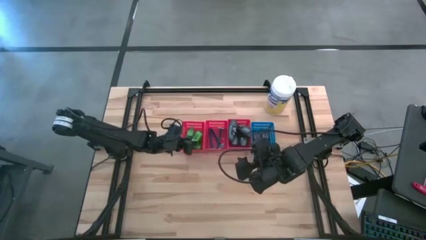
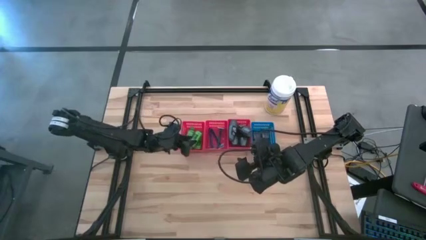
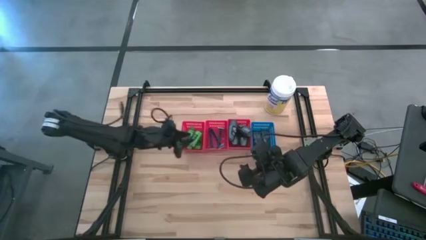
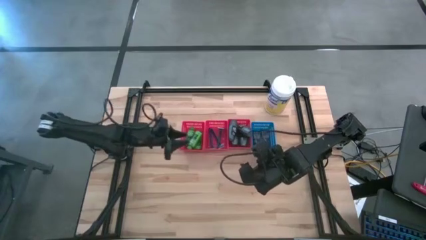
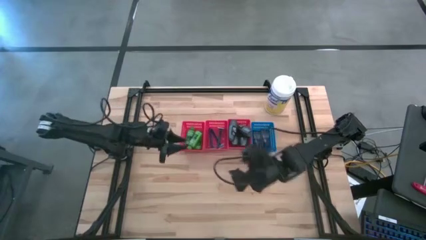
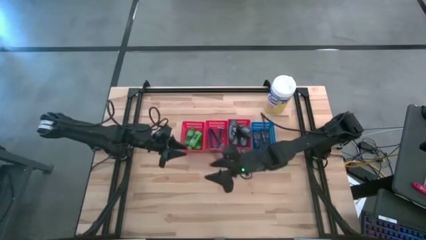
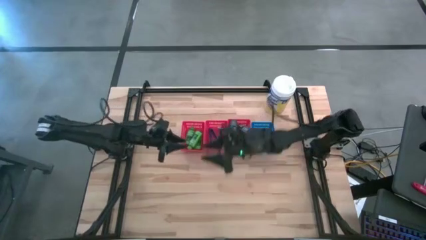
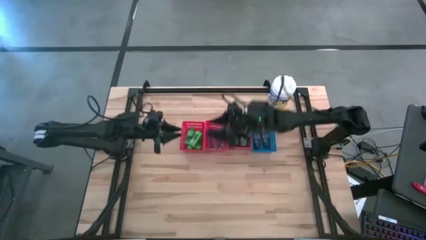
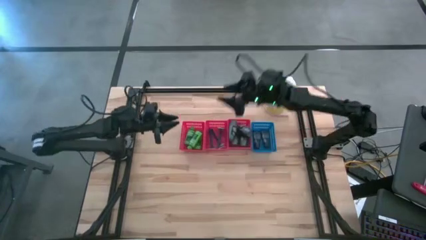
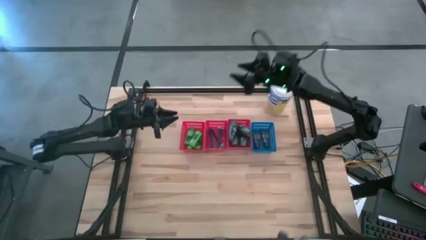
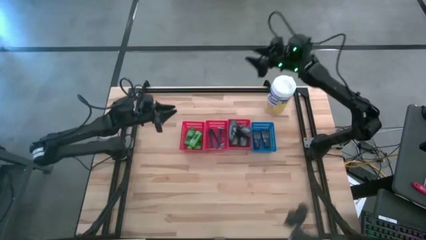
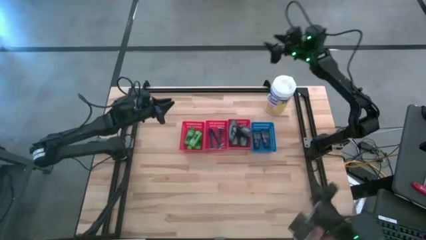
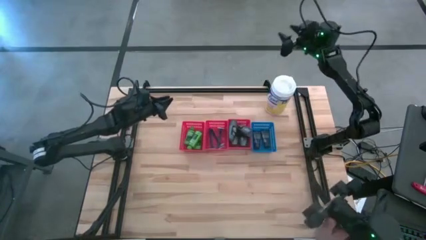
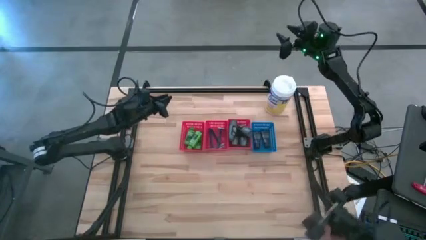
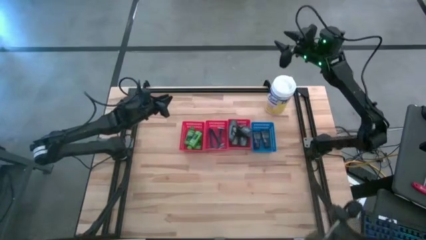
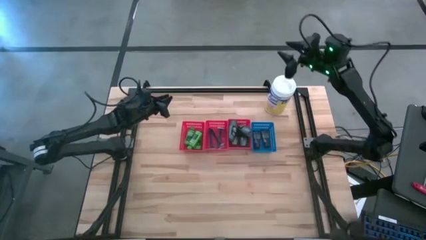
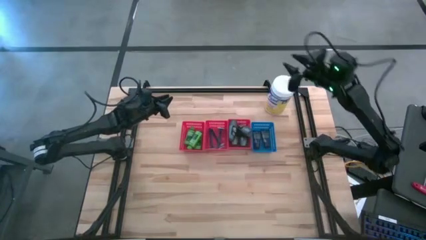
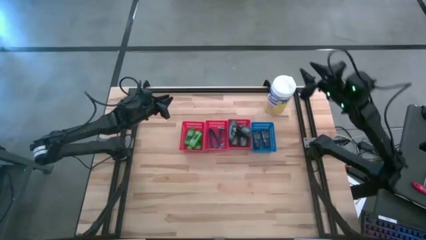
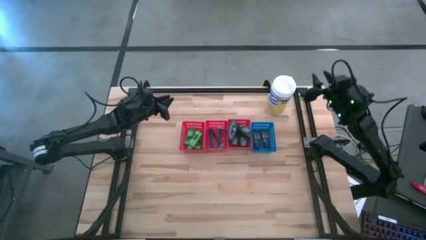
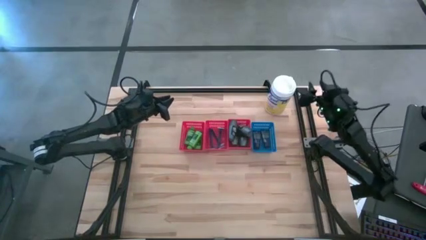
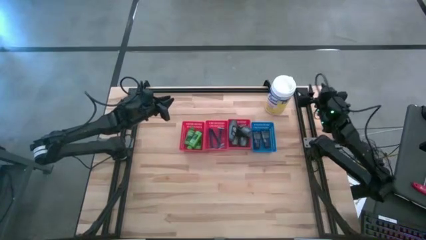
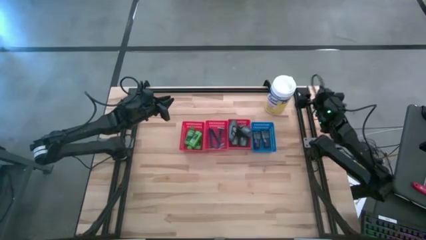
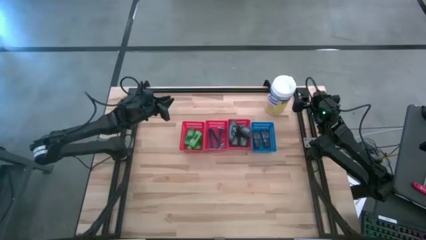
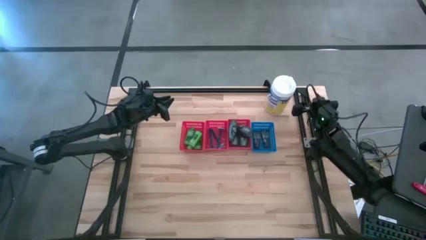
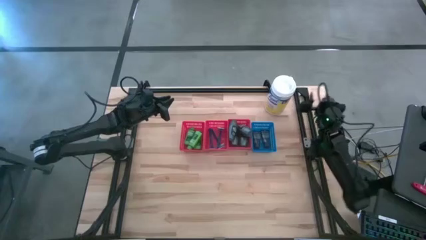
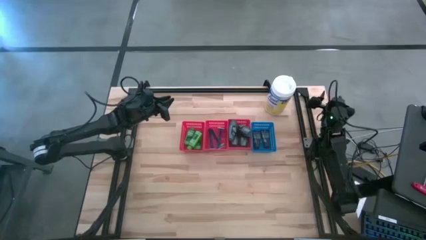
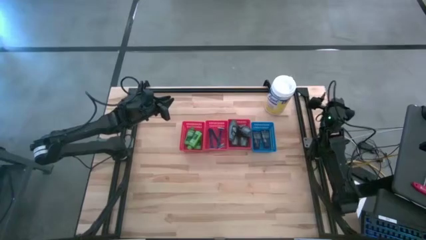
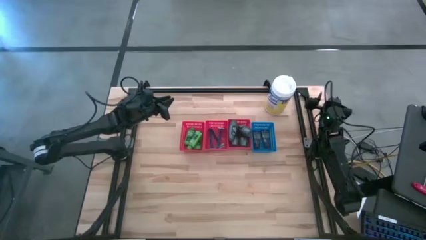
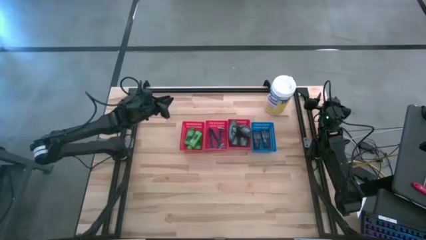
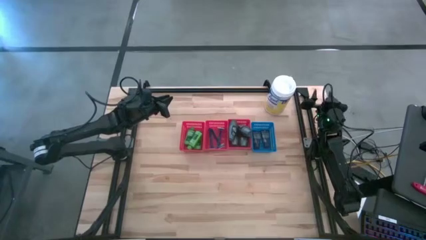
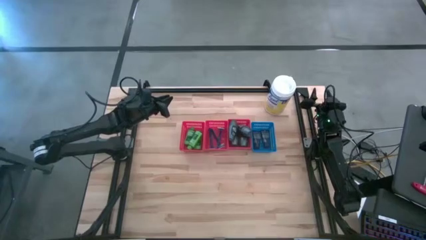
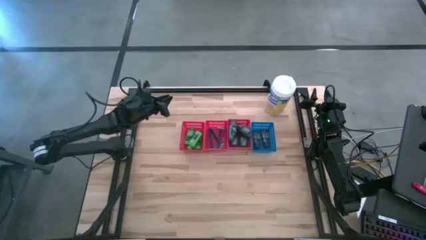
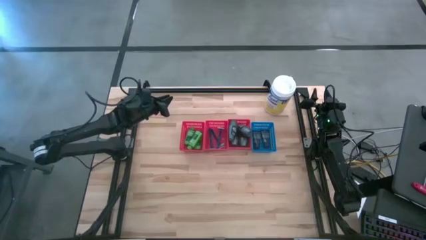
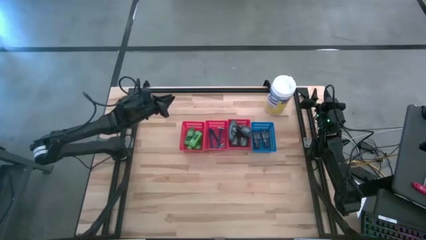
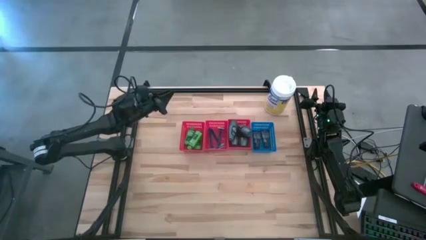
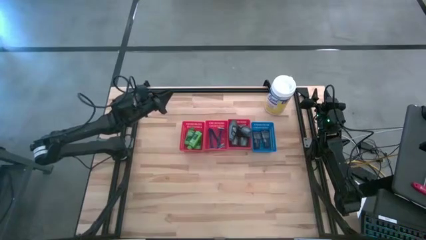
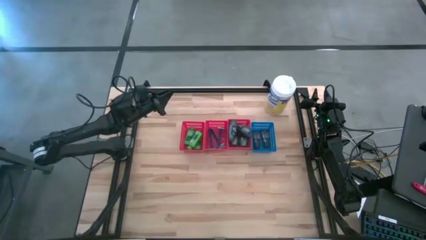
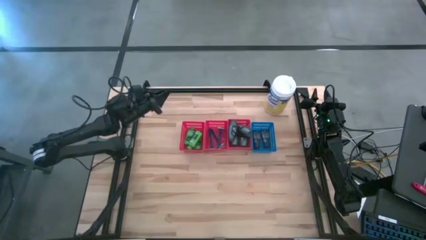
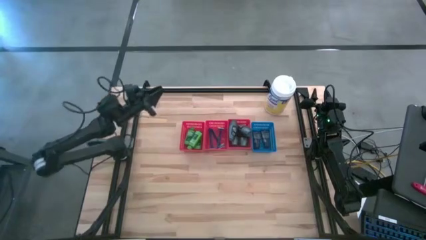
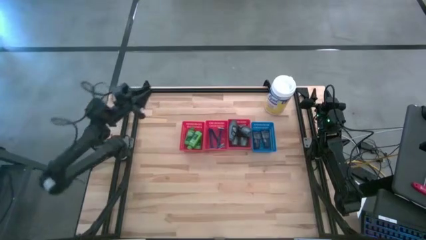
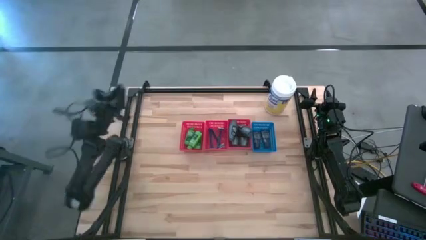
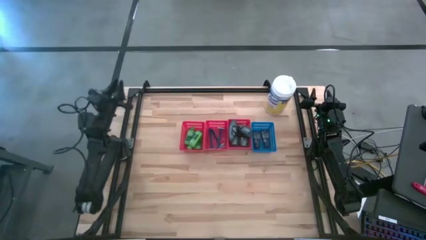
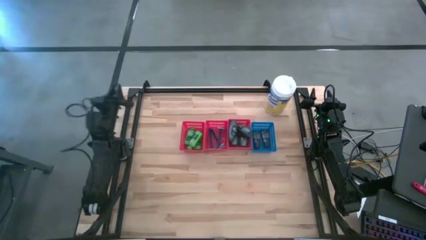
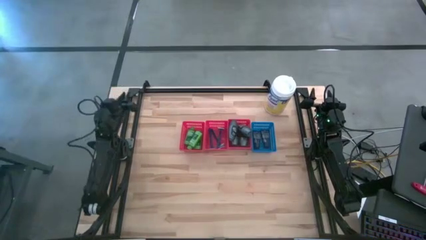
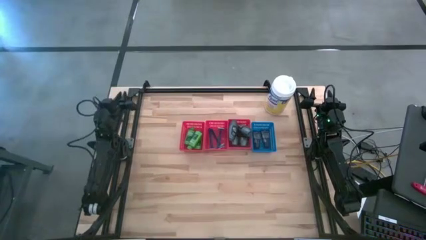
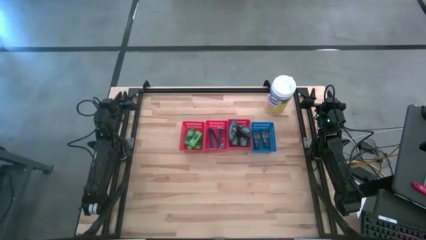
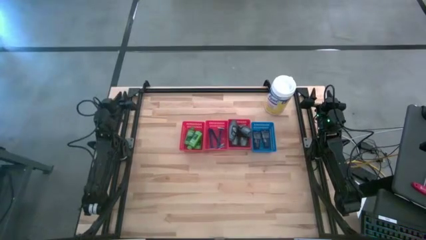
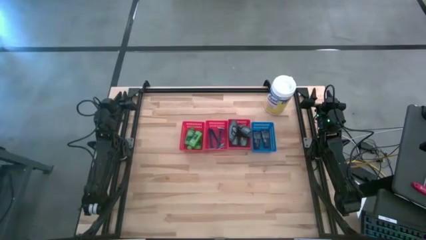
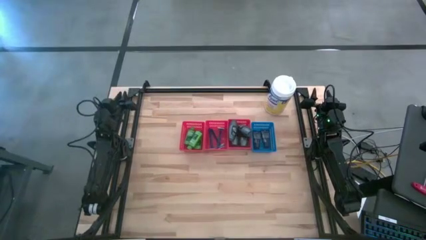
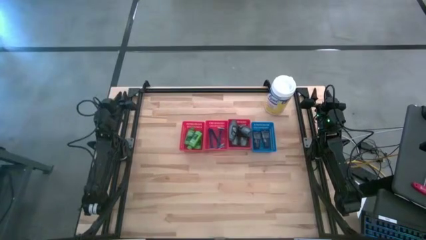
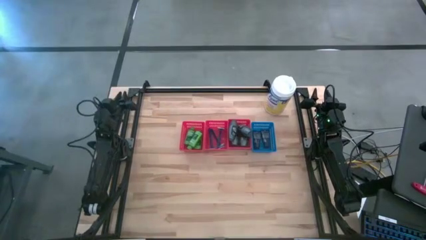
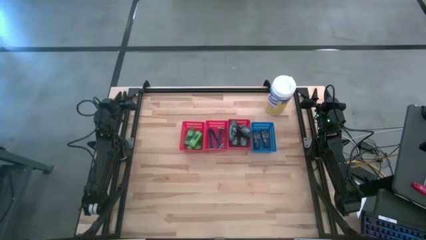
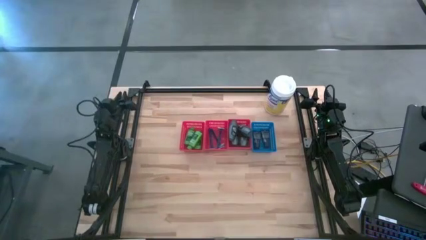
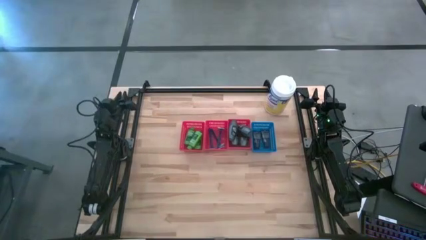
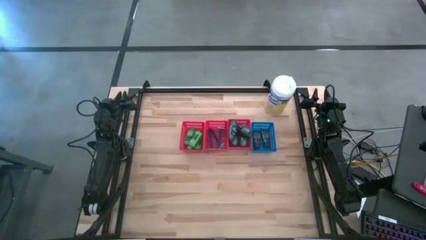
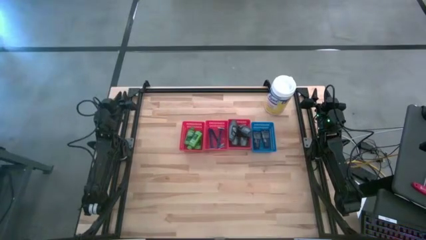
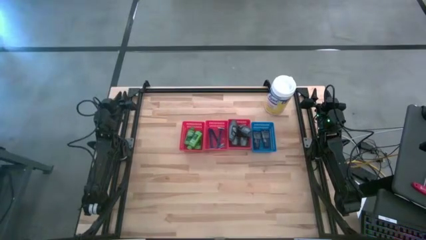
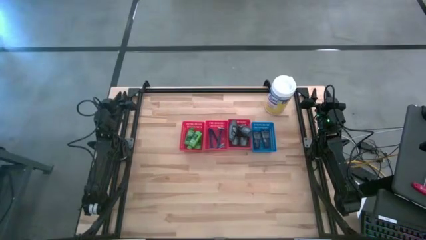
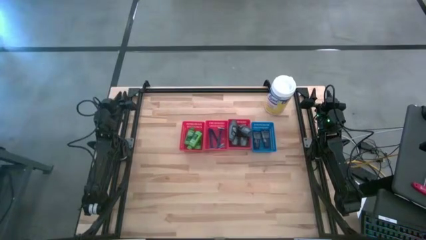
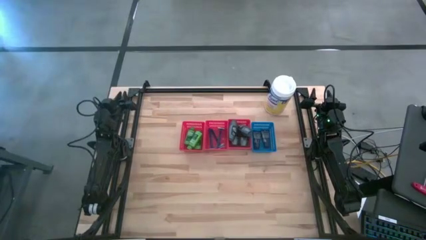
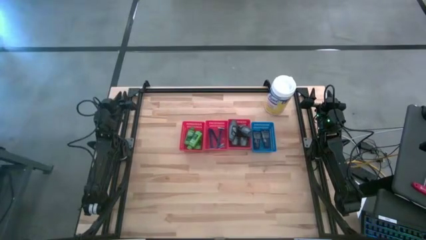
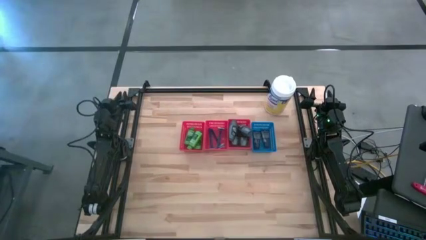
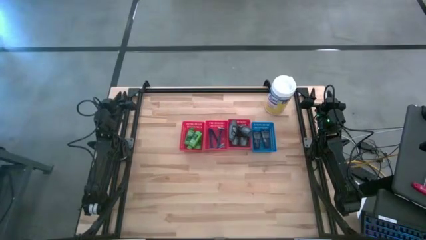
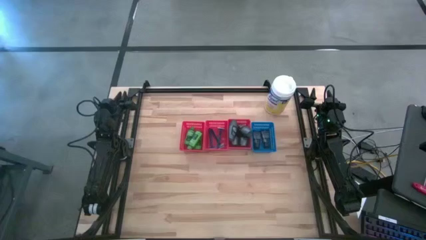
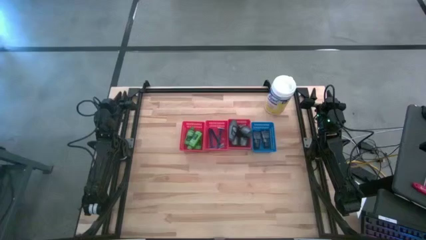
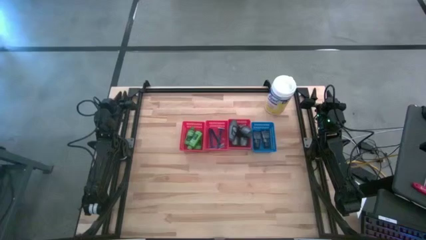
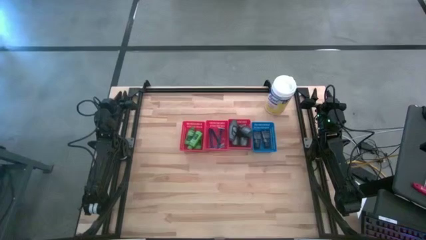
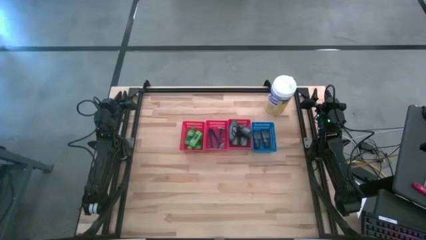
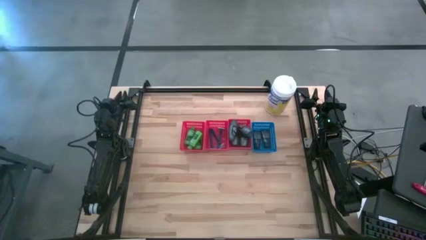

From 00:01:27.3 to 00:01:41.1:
Task: Pick & Place Travel size toiletries
Return to Home Position

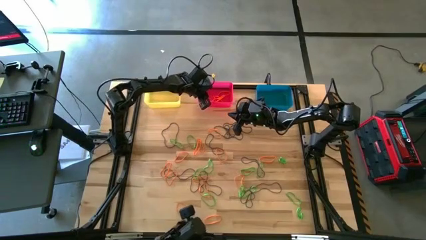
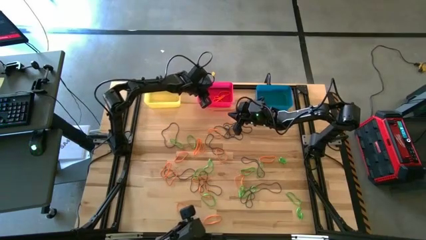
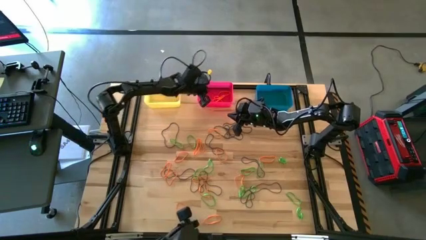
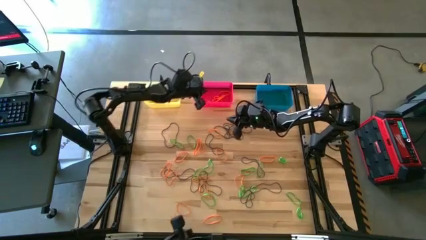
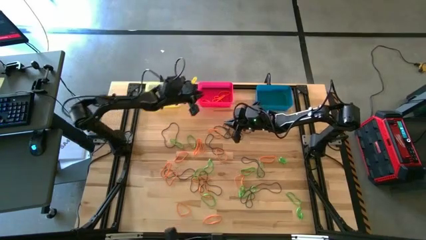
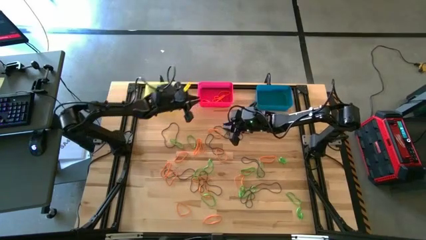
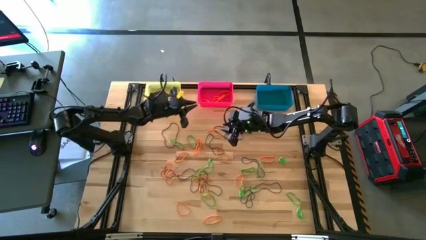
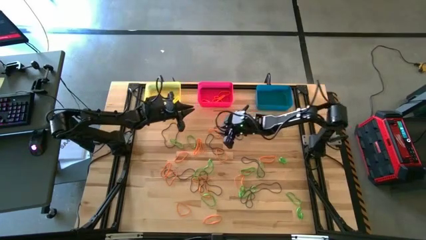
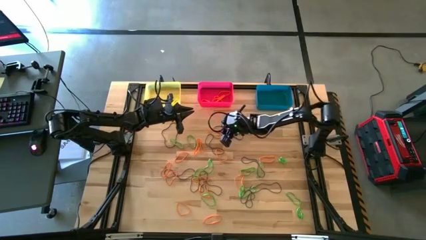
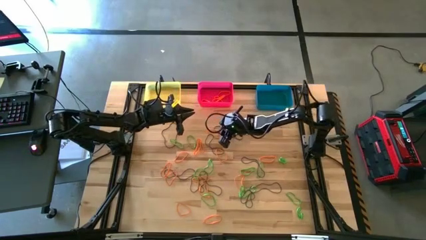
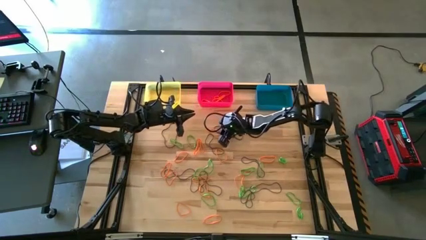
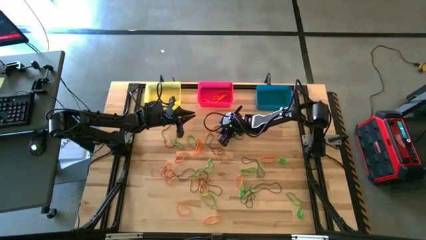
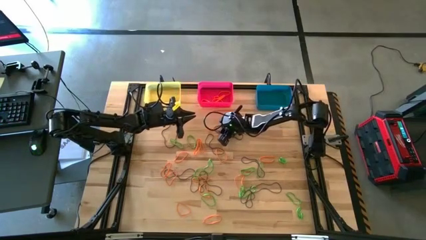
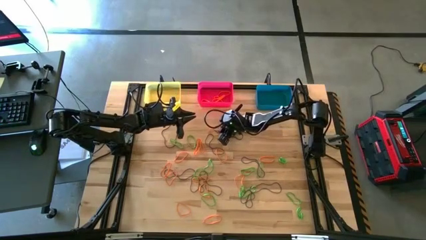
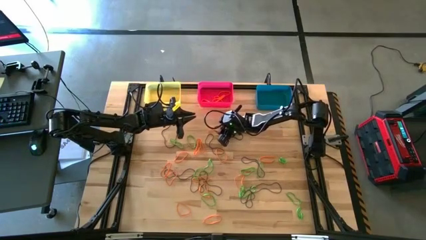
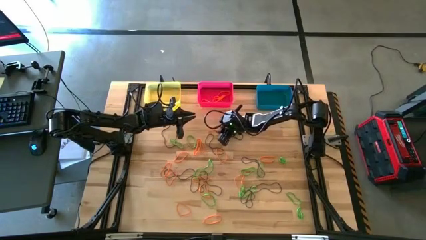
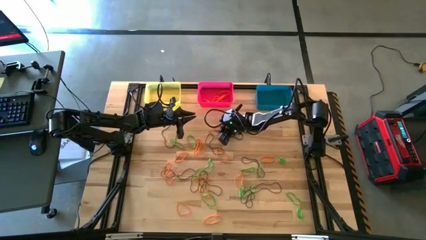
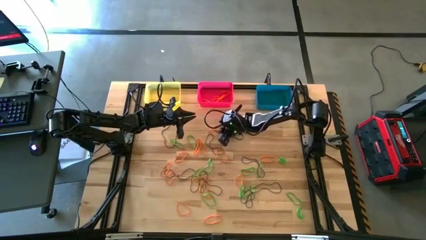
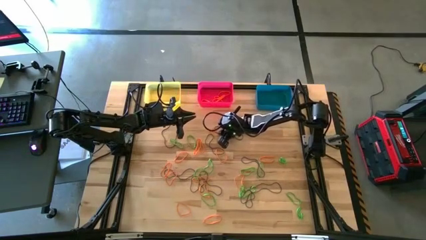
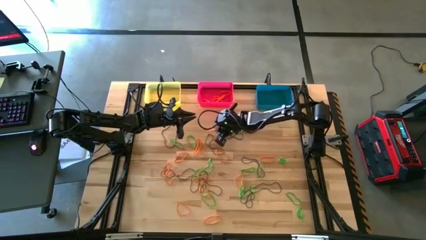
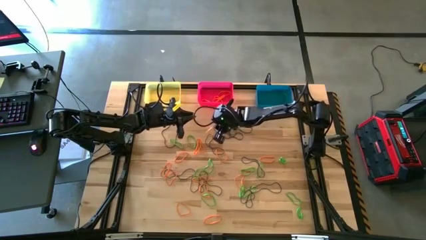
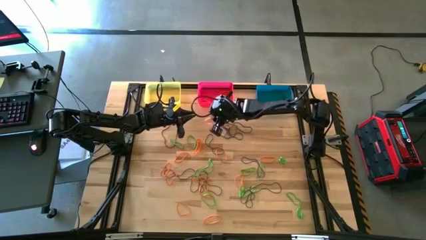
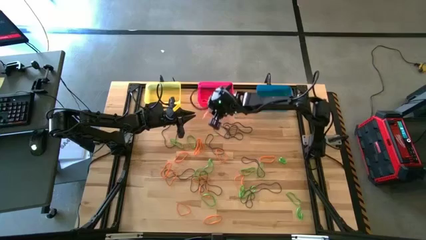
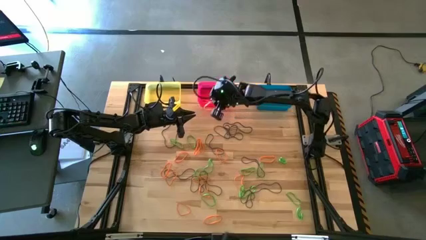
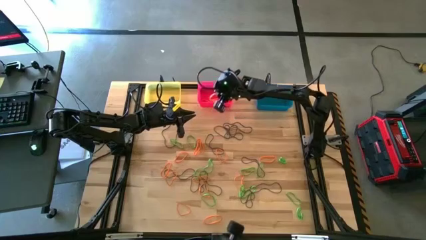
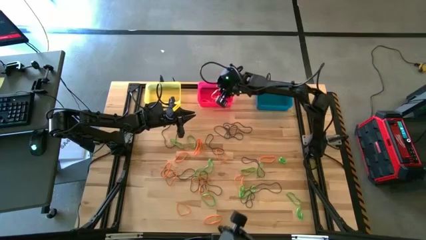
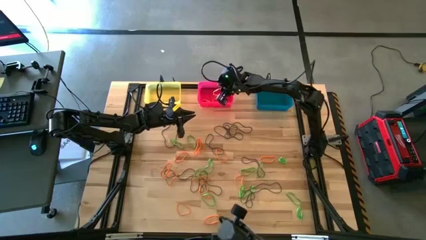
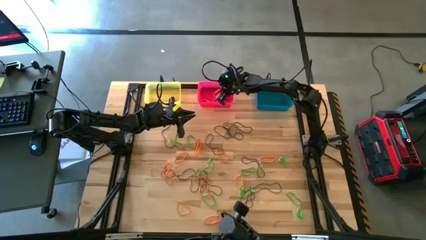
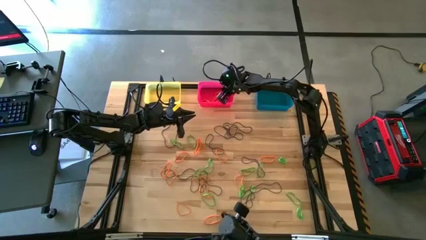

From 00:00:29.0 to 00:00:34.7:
Task: Sort rubber bands into baskets
Put the orange rubber band into the pink bin
